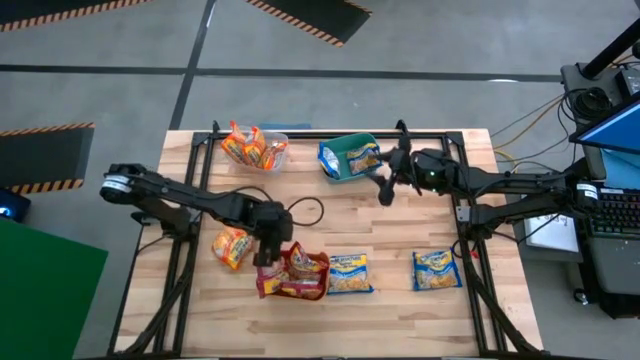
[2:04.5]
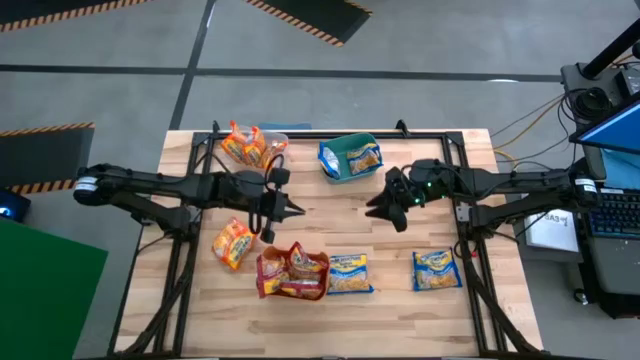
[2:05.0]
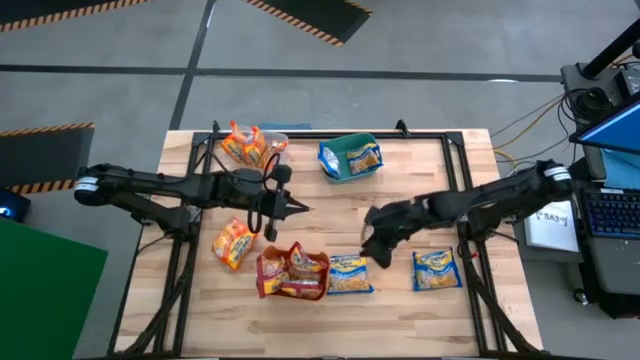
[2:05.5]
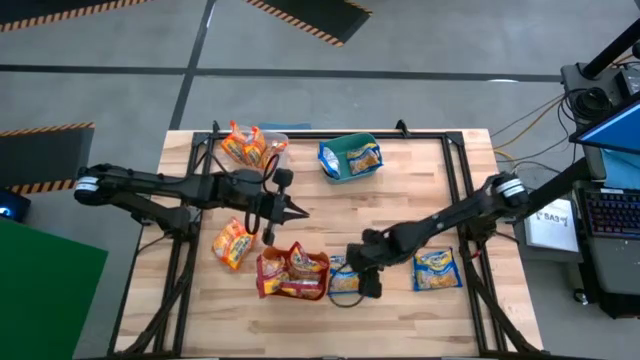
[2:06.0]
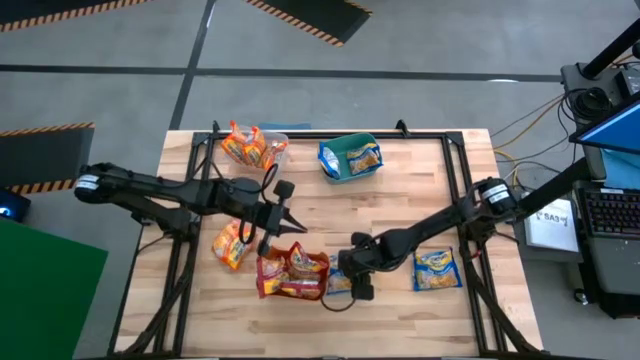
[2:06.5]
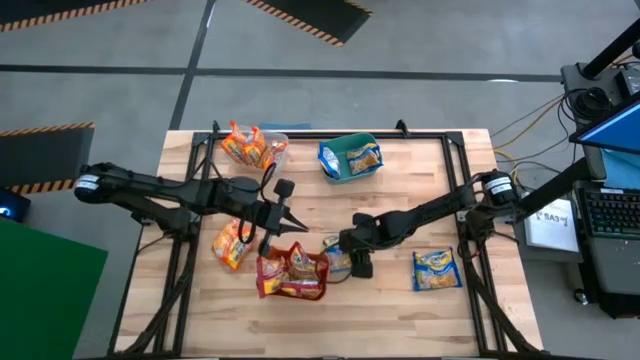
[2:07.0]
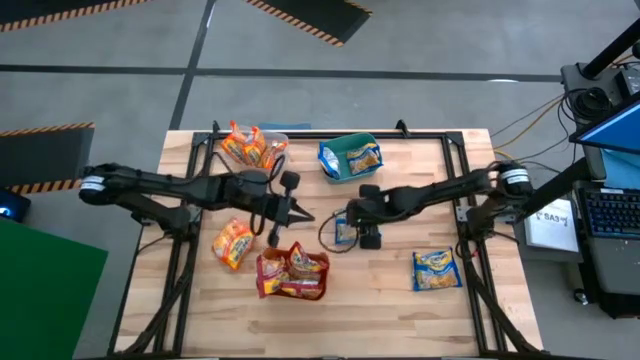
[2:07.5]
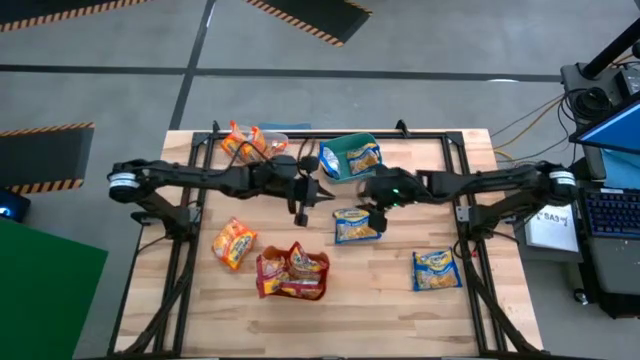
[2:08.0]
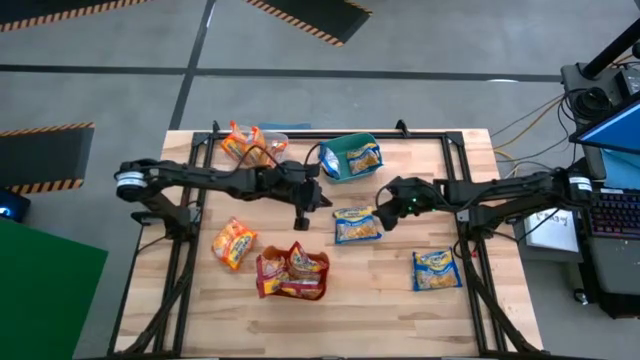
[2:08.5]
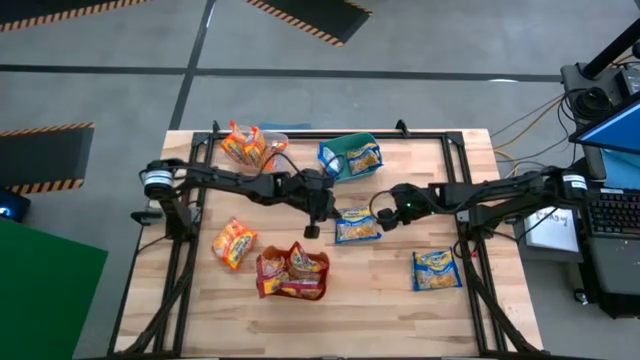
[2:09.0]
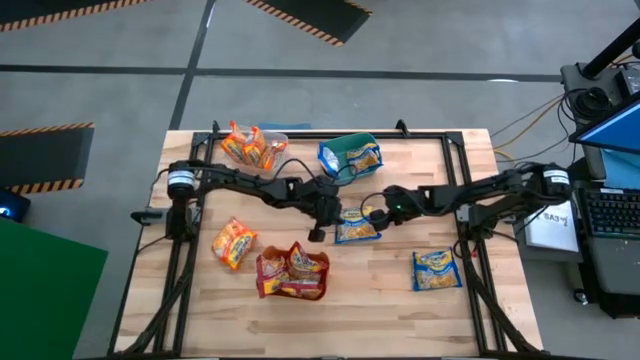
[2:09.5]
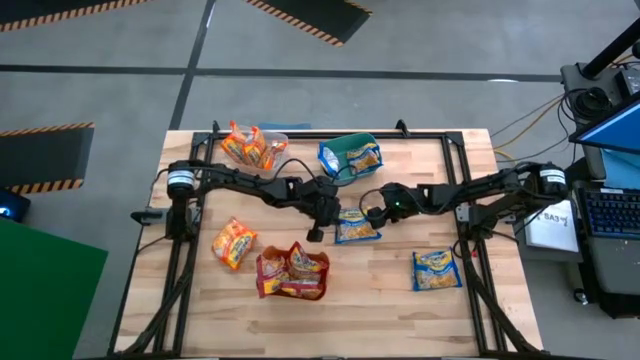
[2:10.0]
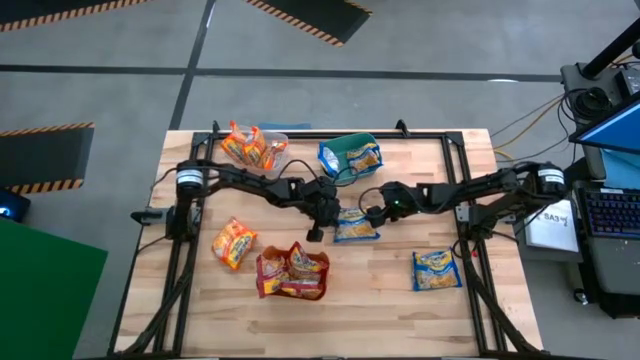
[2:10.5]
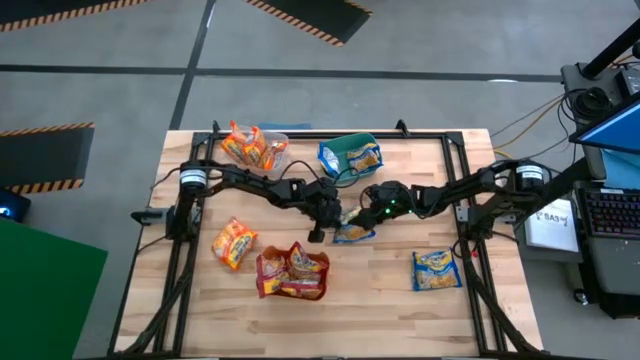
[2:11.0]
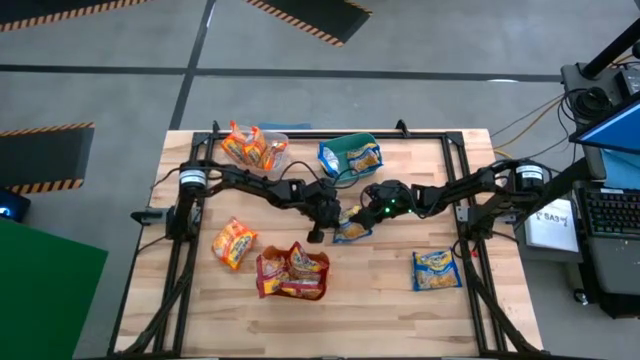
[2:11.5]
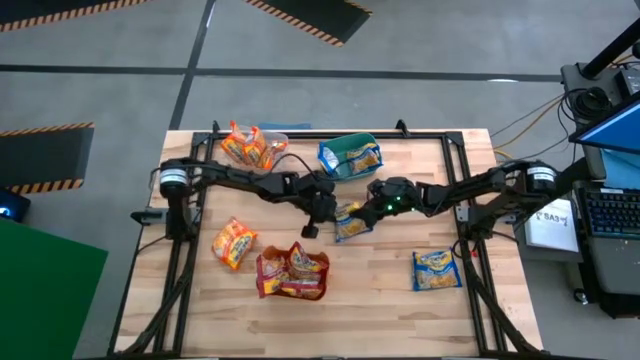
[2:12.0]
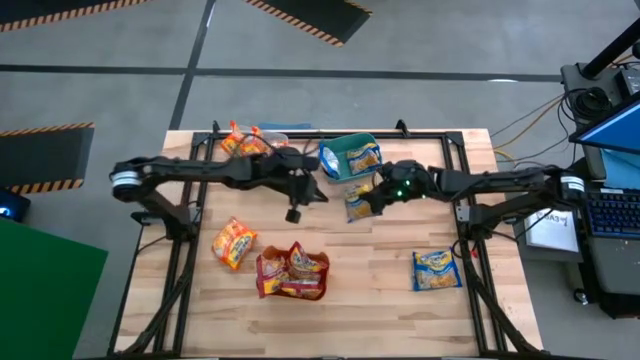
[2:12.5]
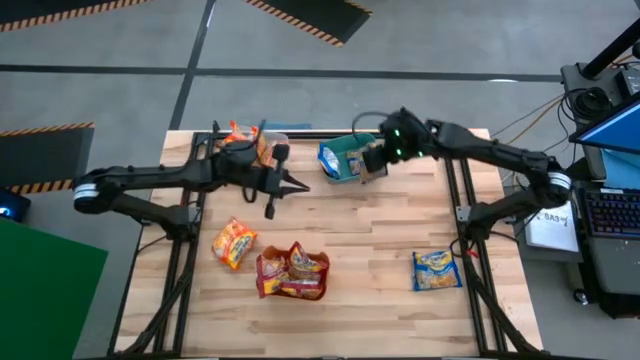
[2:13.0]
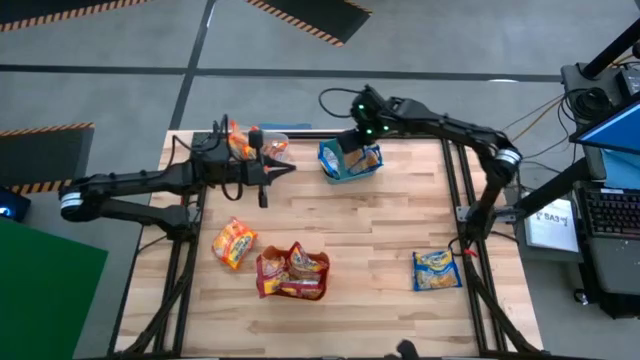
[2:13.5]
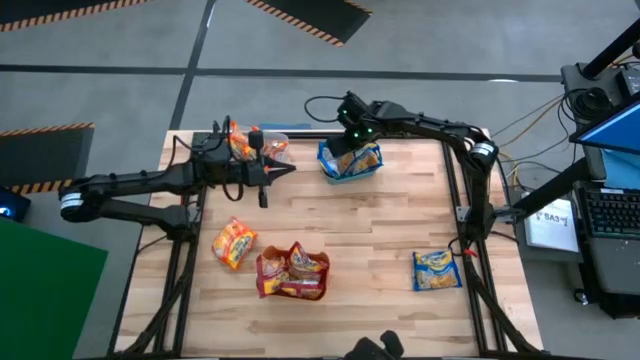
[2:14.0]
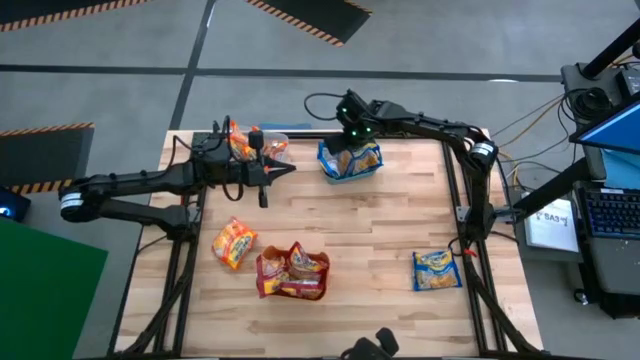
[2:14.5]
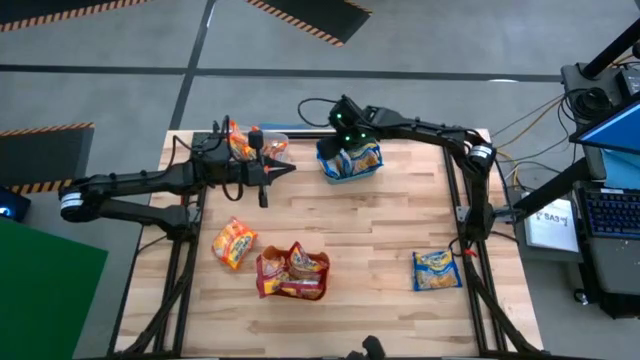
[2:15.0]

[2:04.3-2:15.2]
Task: Sort Maruchan noodles
Put the blue noodle pack into the green bin

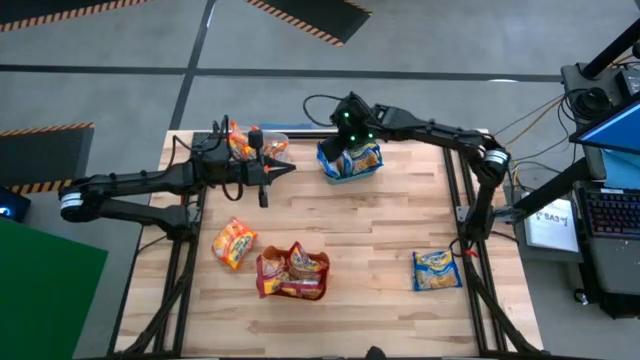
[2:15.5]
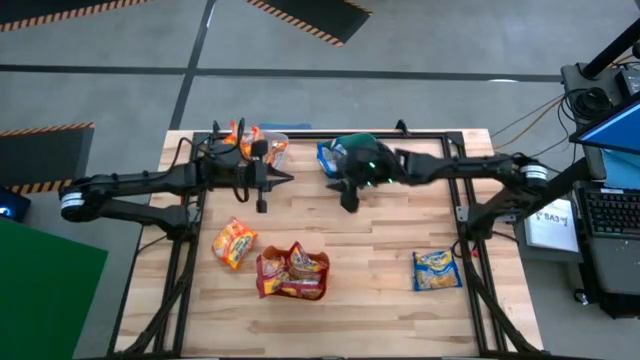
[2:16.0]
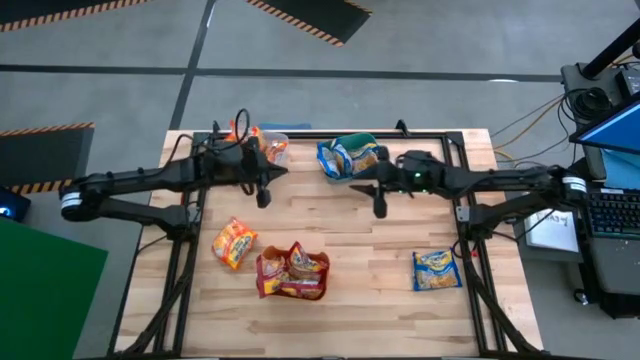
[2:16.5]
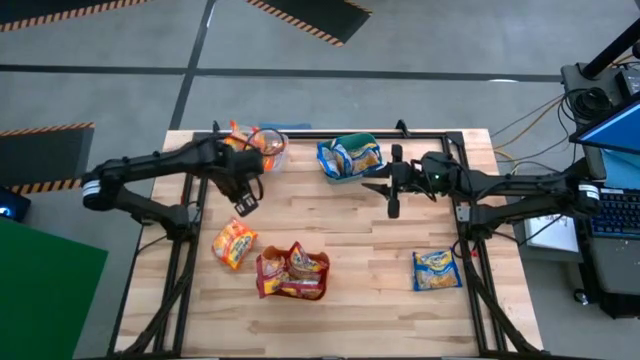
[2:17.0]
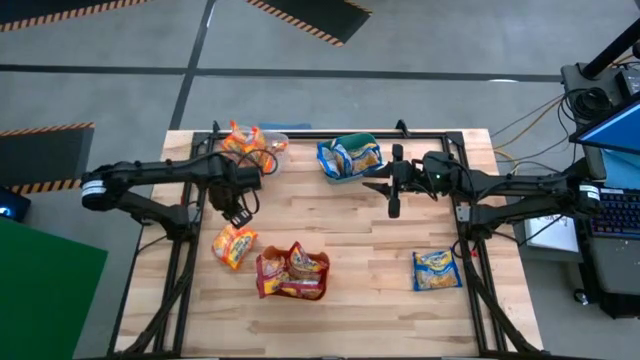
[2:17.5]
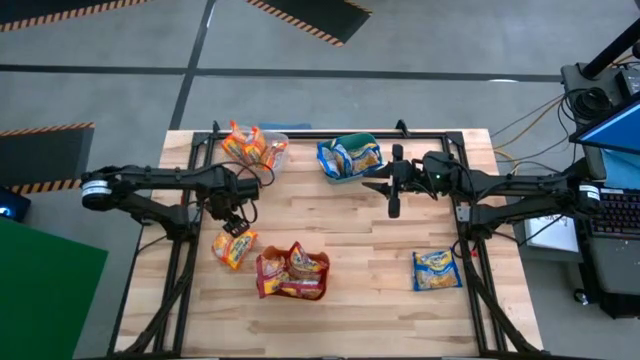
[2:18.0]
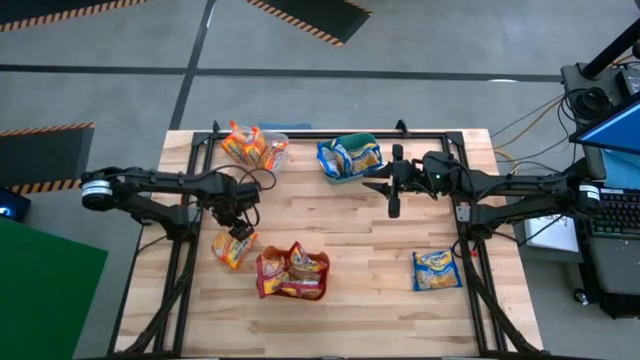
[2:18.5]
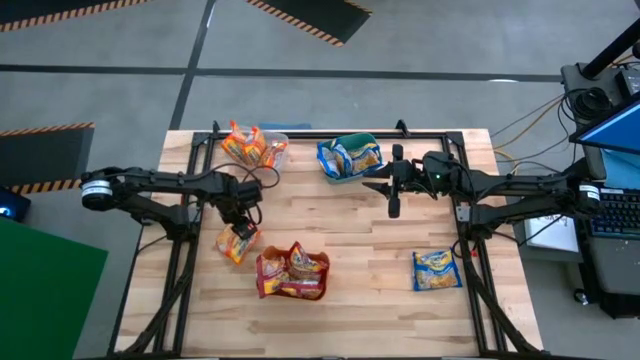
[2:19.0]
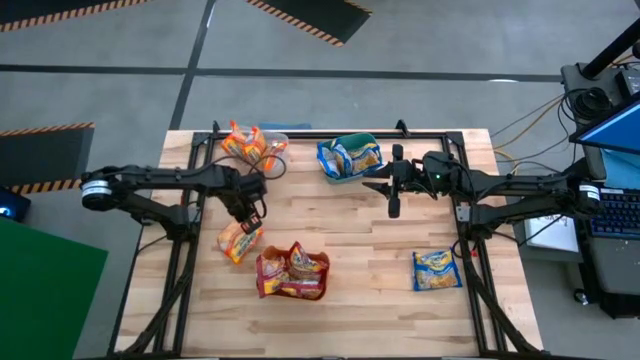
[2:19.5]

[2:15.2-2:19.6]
Put the orange noodle pack into the transparent bin

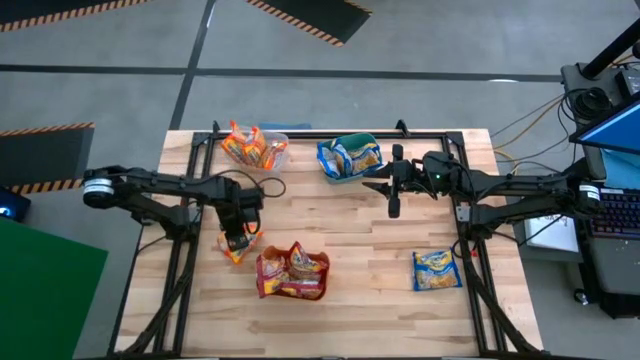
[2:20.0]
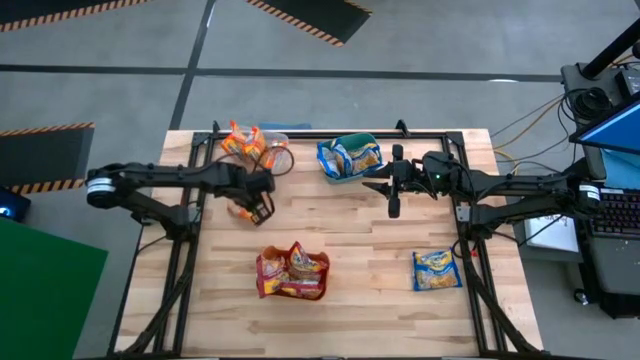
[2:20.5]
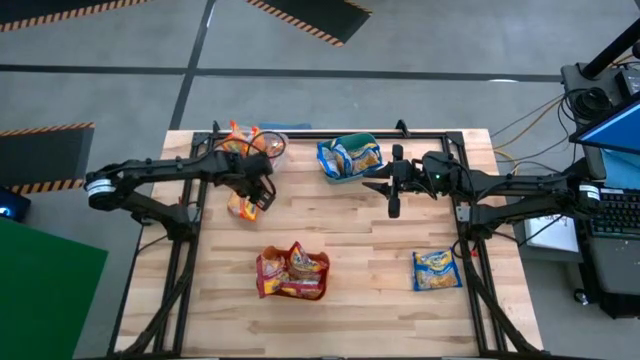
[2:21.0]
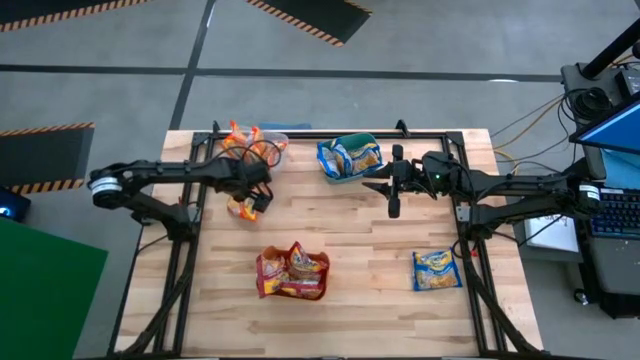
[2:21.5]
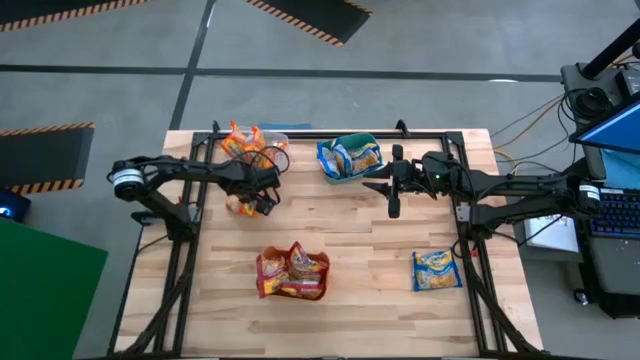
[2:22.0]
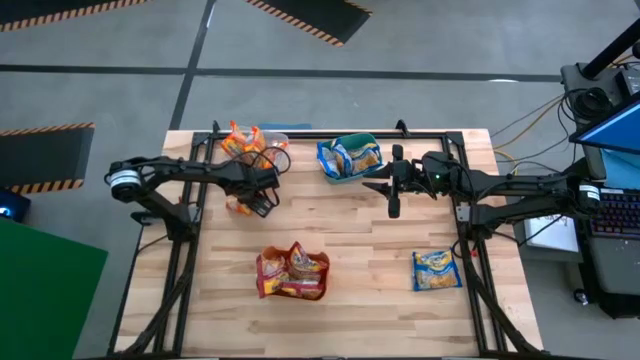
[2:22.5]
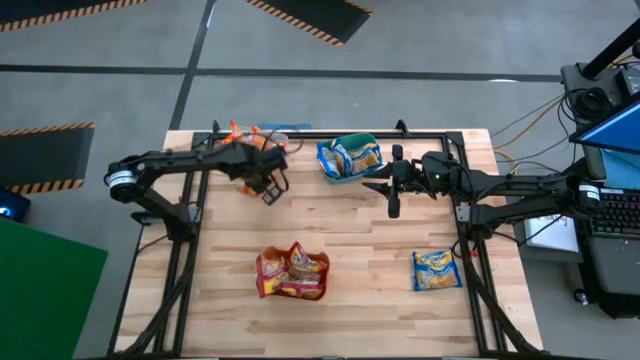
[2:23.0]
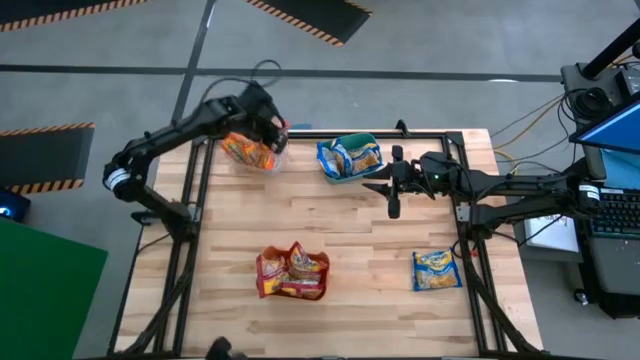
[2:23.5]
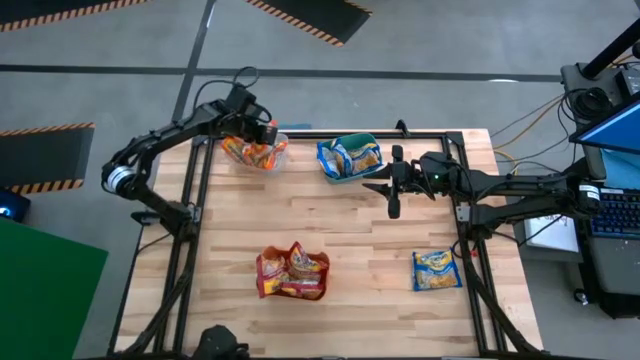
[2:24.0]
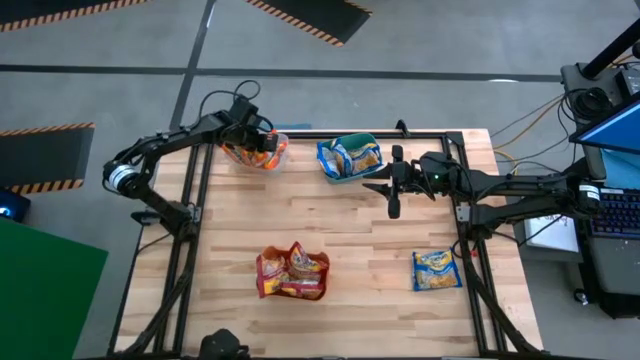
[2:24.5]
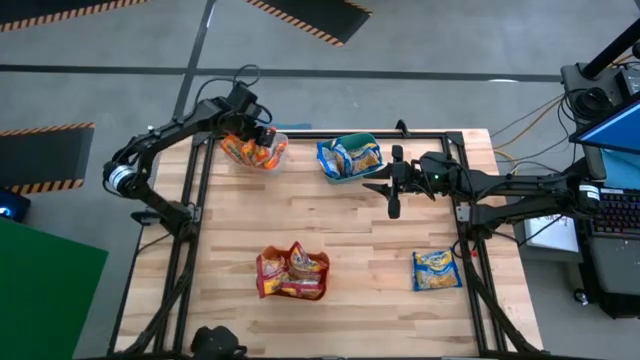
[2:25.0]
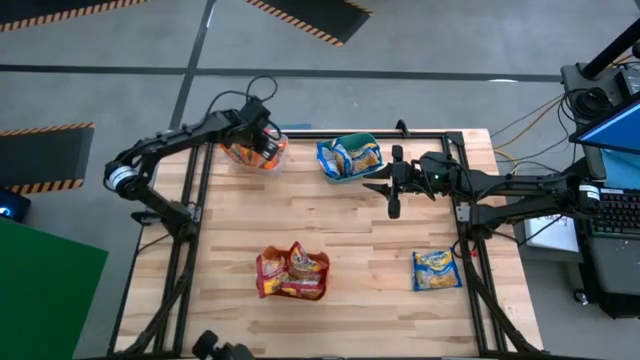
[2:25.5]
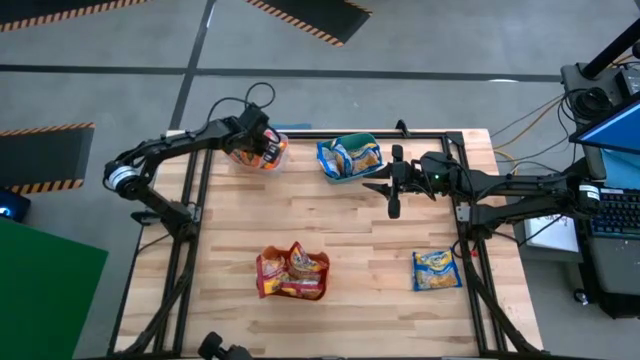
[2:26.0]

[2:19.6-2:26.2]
Put the orange noodle pack into the transparent bin
